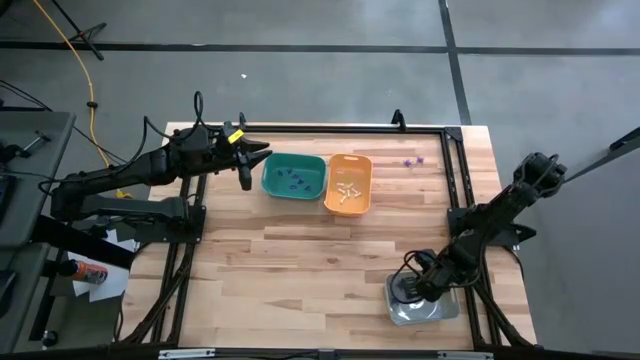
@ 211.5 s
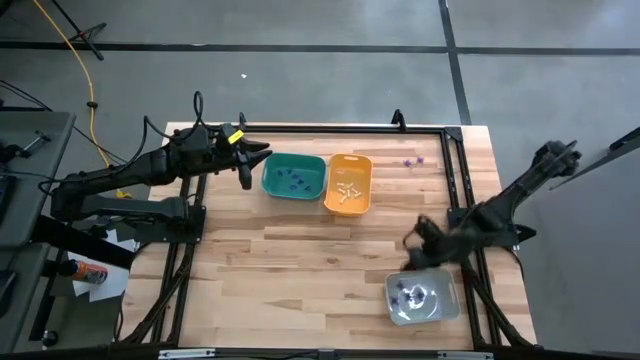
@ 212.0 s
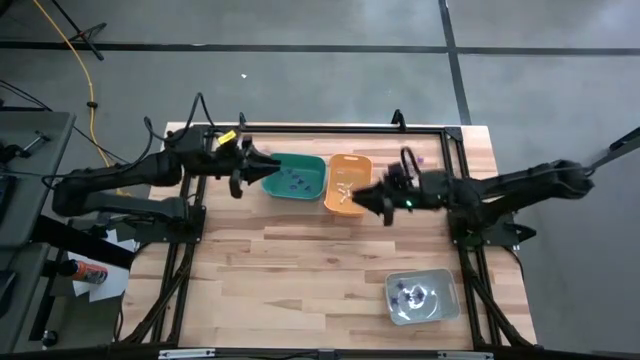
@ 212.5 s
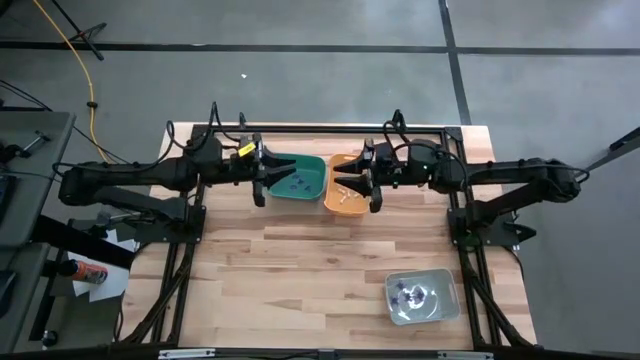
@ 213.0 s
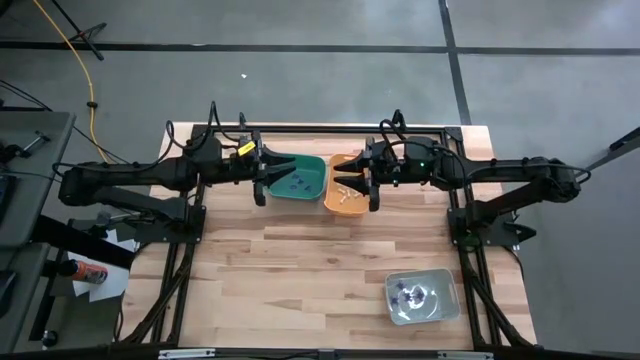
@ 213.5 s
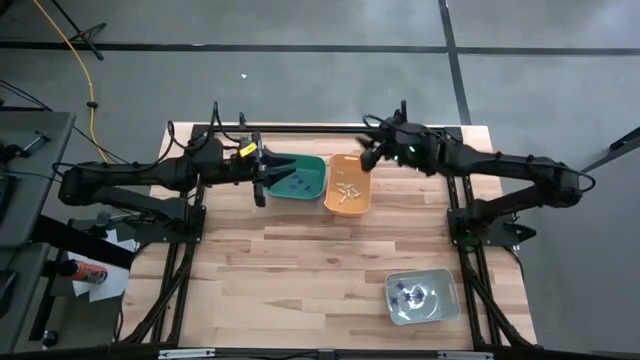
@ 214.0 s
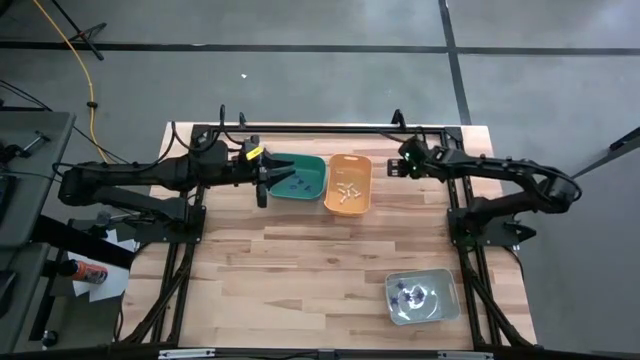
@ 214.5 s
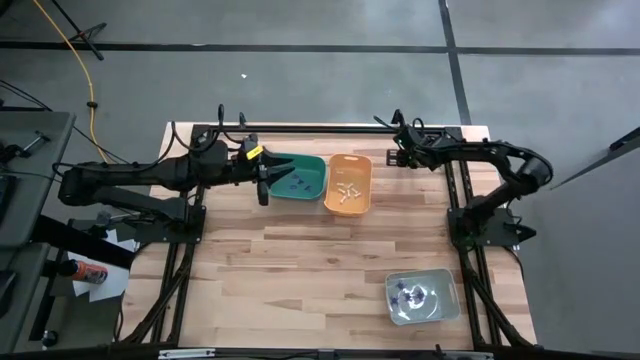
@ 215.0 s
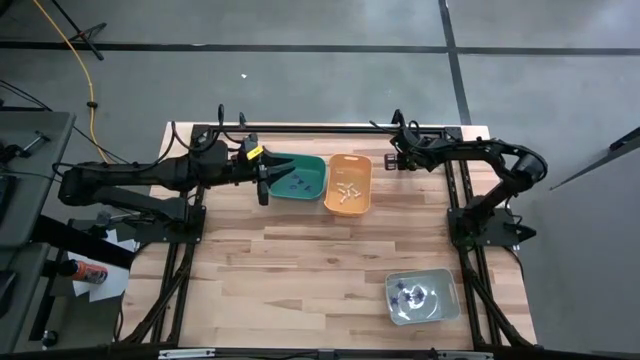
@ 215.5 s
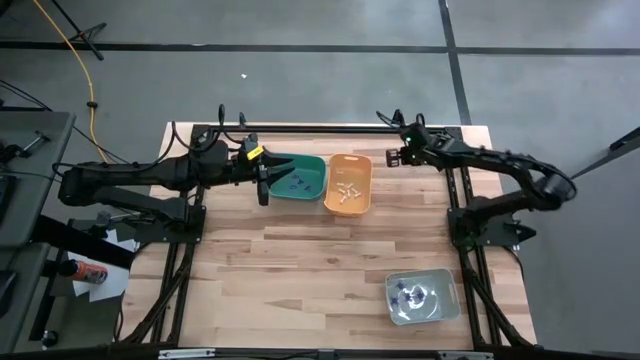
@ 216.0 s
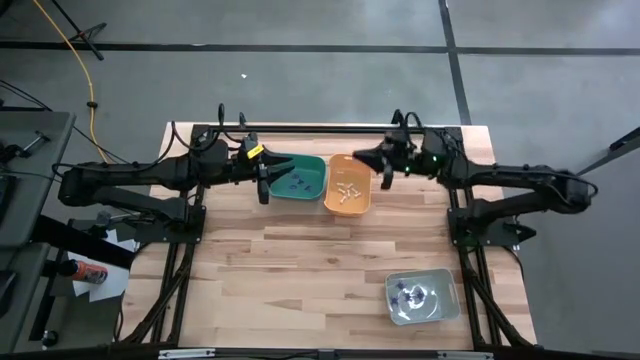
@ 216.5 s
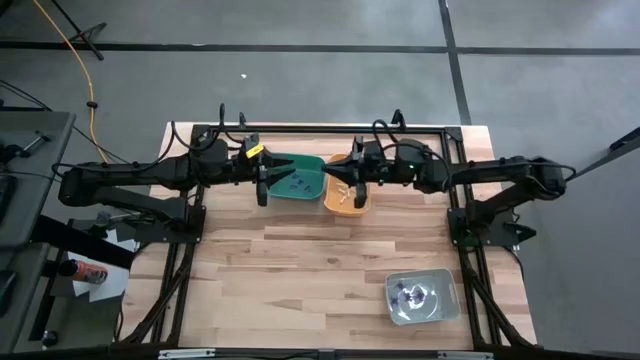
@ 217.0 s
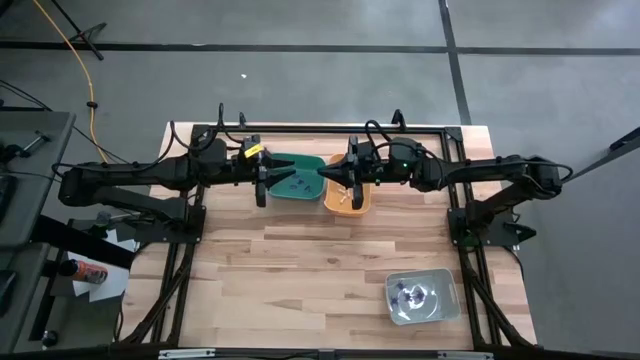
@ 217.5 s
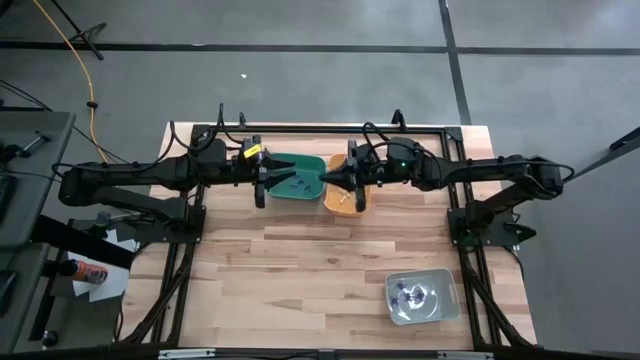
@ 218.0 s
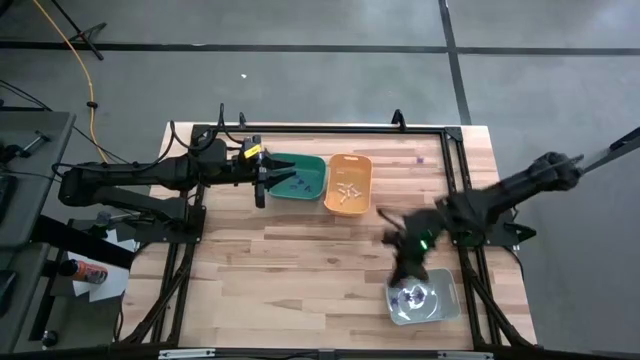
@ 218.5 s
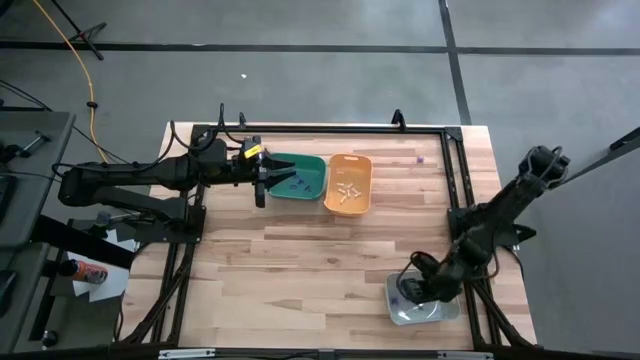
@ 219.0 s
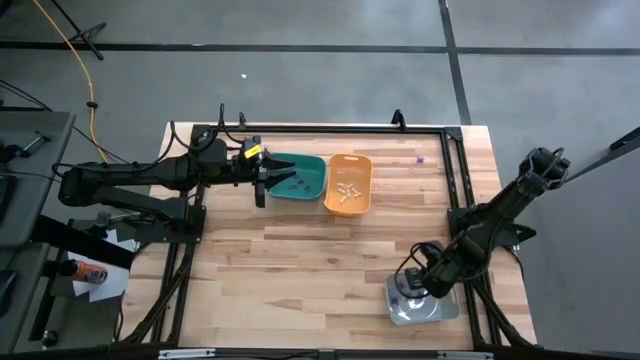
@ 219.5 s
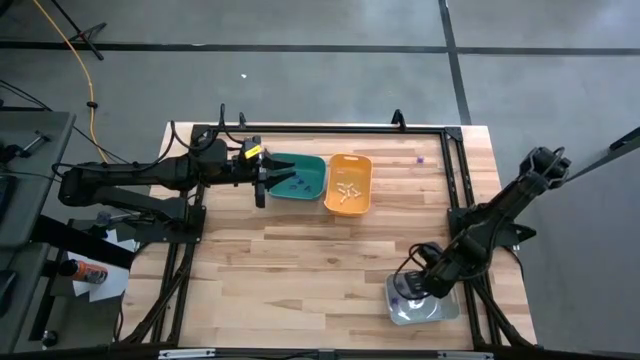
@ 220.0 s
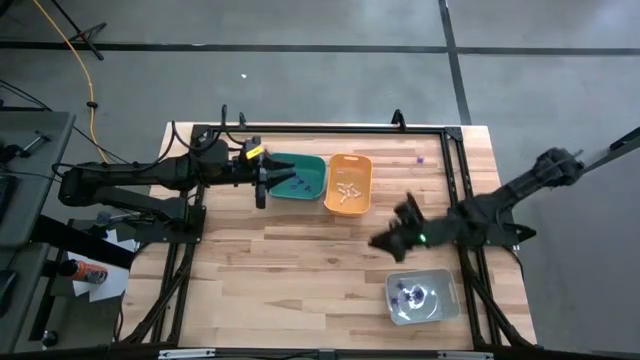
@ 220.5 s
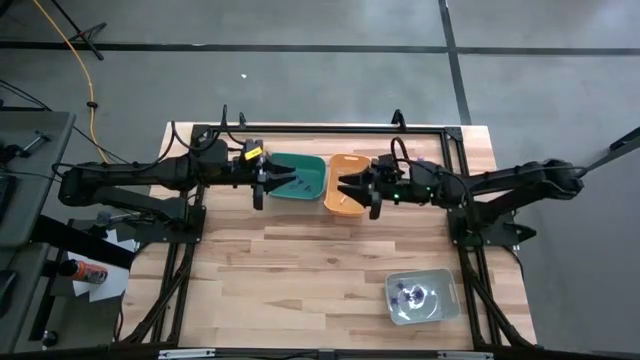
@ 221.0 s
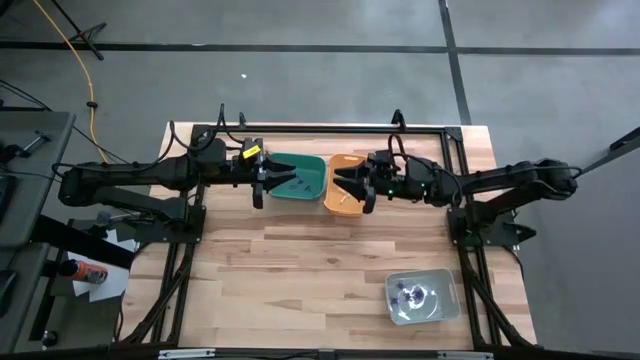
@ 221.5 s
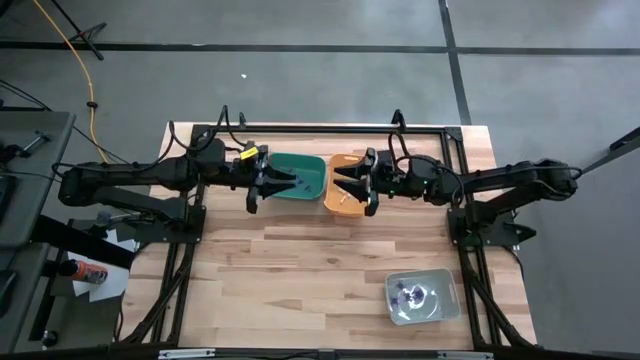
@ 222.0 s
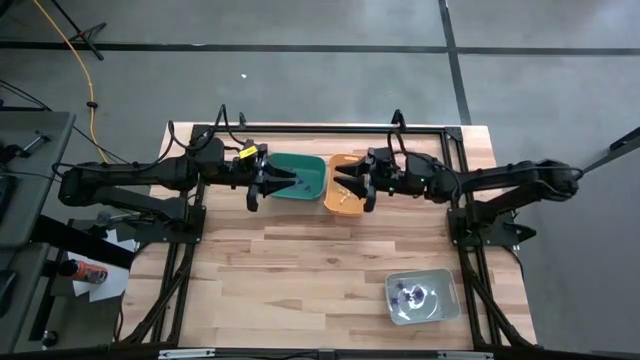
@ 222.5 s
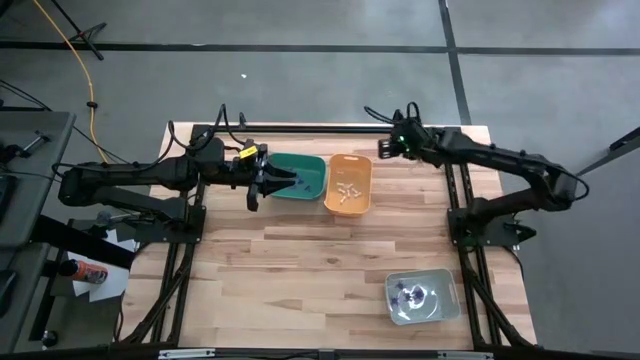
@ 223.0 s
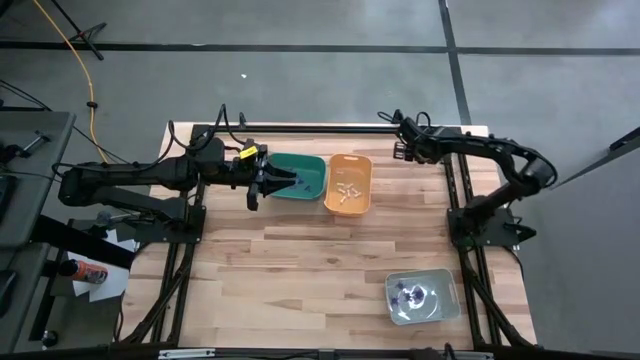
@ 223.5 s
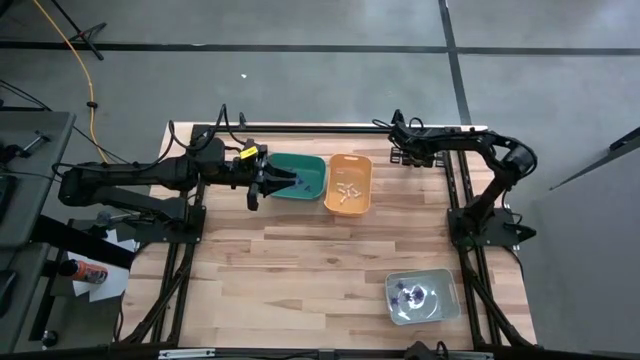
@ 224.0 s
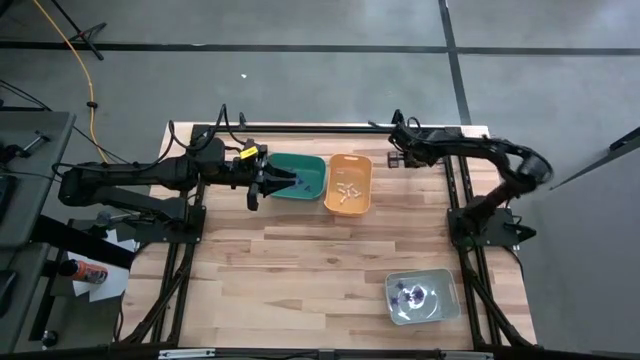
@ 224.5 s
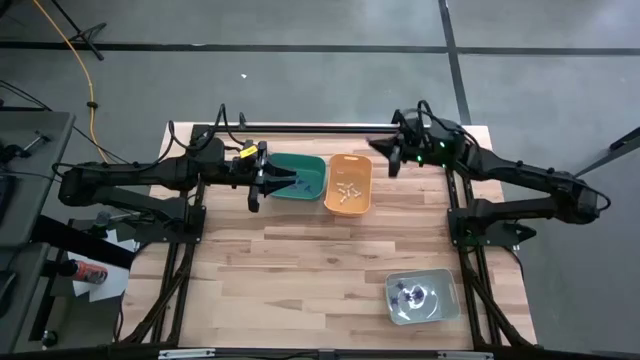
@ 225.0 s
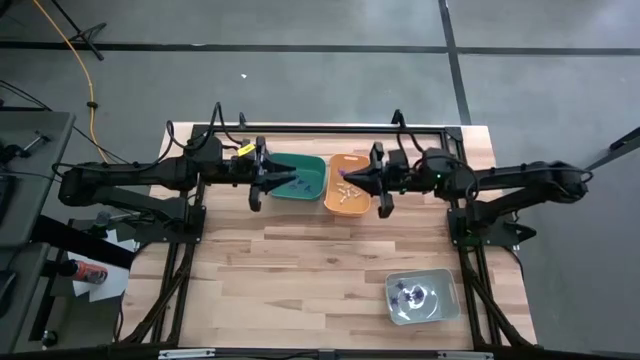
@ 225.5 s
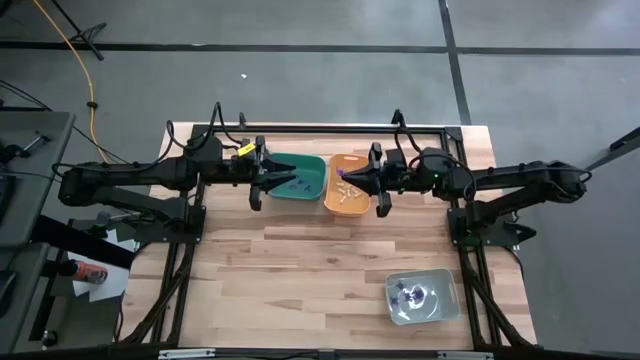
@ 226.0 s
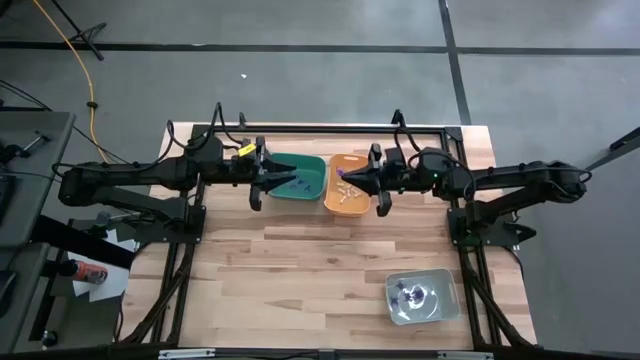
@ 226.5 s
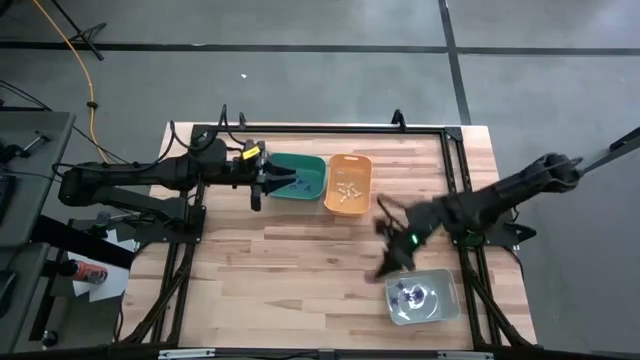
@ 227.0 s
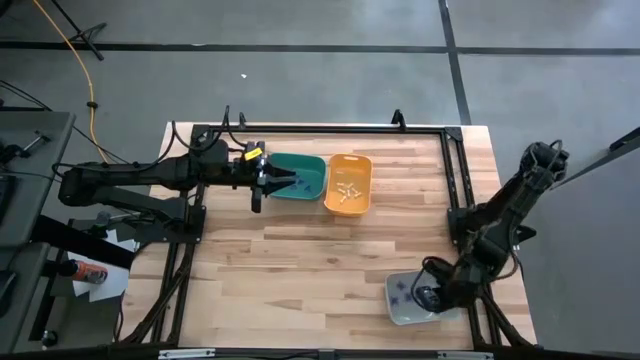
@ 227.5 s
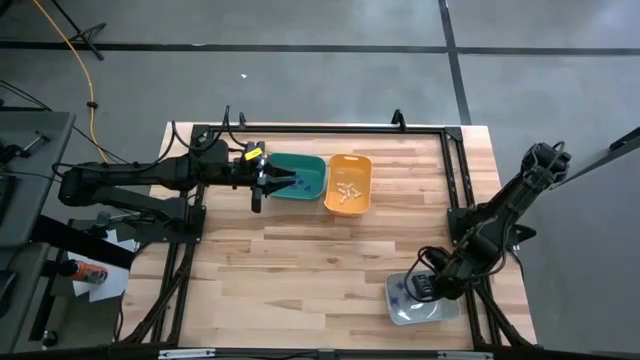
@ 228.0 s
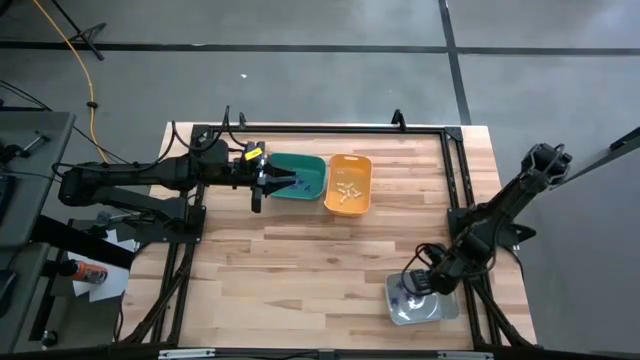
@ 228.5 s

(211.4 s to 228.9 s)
Task: Sort Halloween decoration
Put the violet spider toy into the gray bin

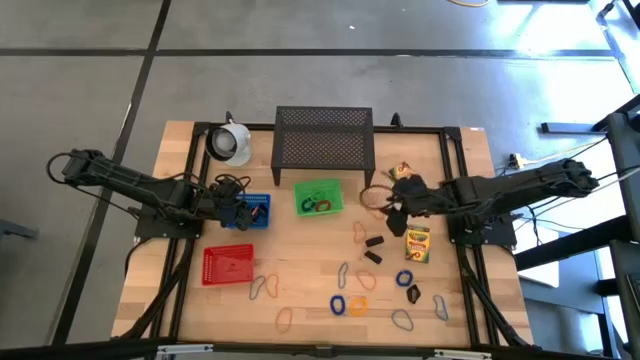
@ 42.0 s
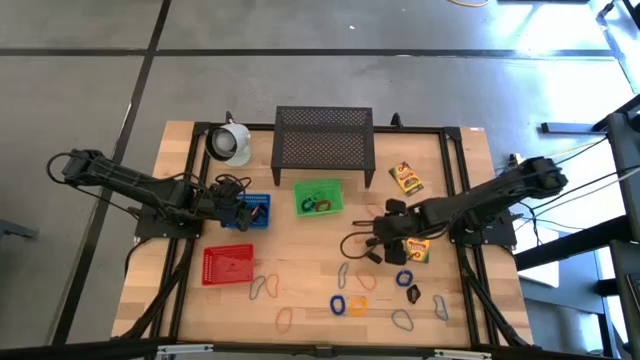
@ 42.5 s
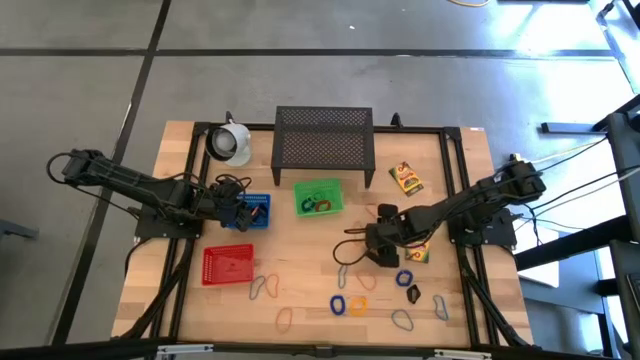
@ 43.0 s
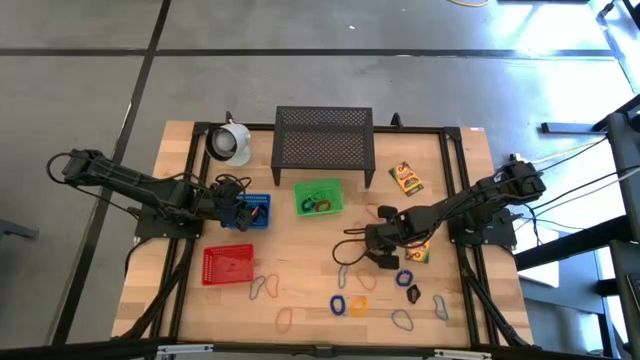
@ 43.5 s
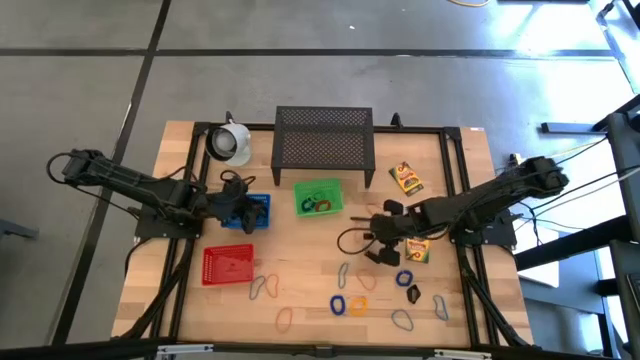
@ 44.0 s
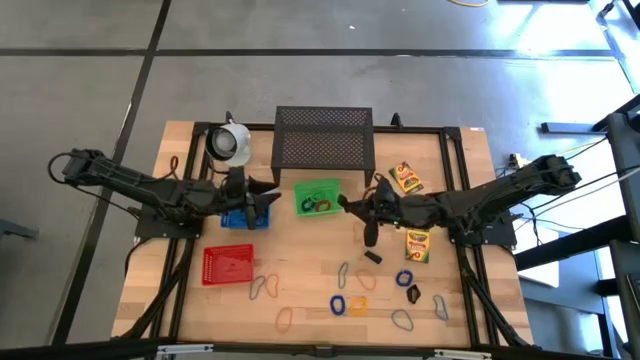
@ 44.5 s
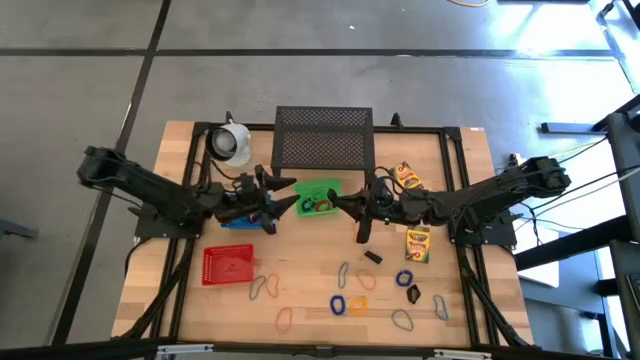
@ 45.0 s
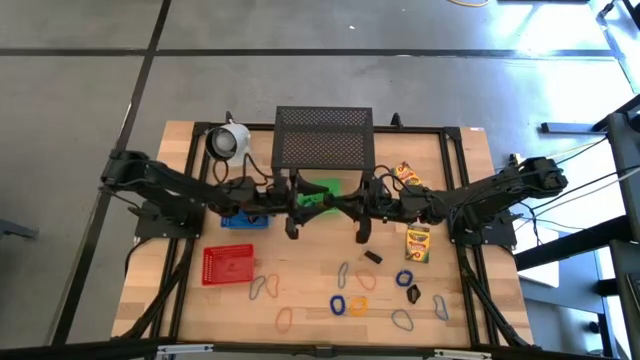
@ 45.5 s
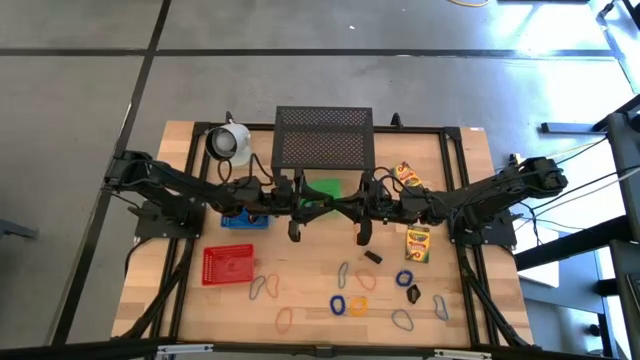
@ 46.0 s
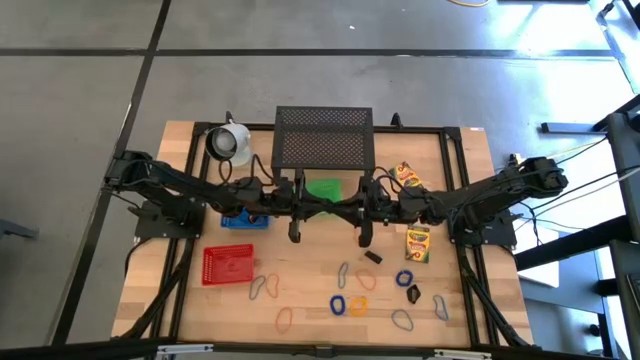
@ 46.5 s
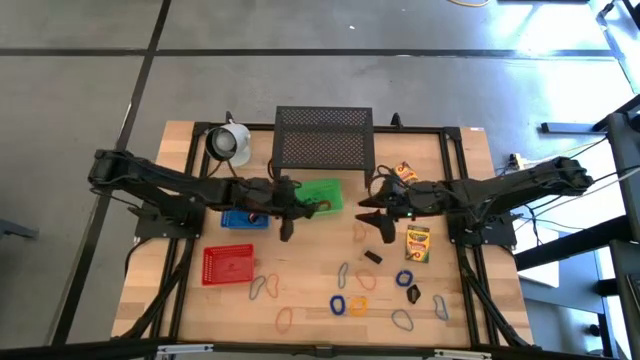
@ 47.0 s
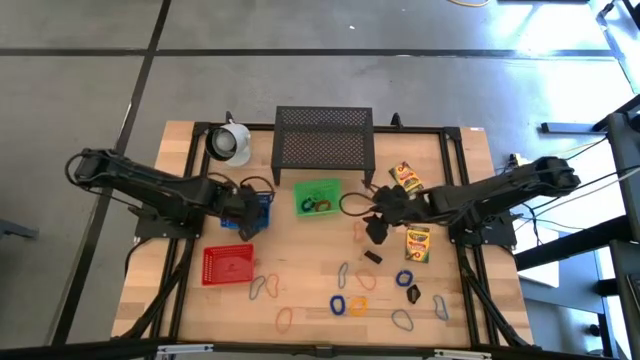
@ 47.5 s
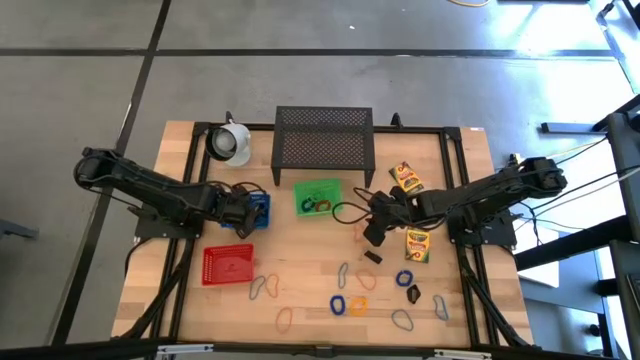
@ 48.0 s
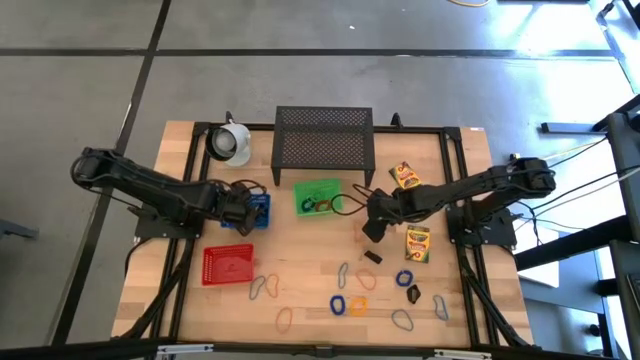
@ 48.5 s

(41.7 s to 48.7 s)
Task: Pick & Place Office Desk Supplies
Put the black rubber band into the blue bin
